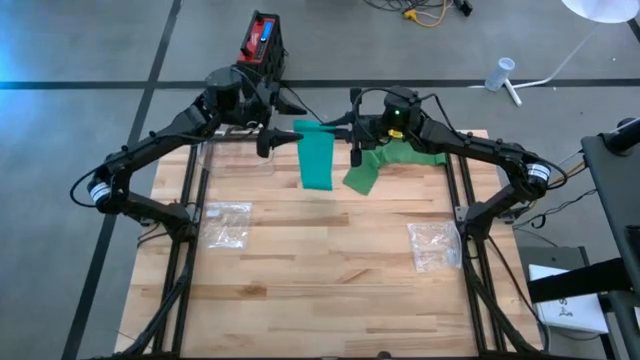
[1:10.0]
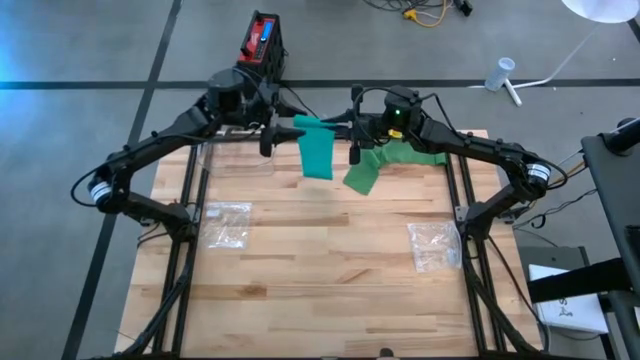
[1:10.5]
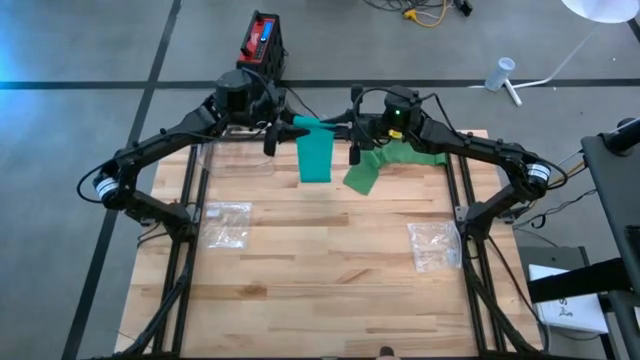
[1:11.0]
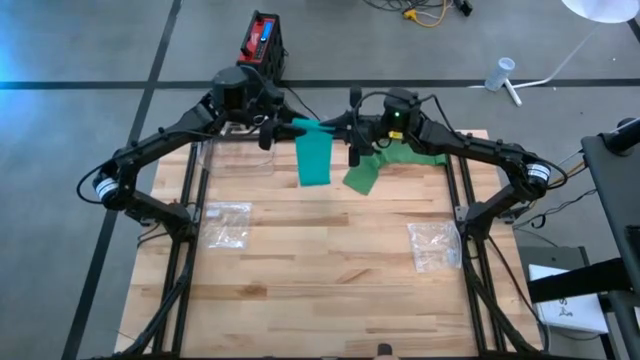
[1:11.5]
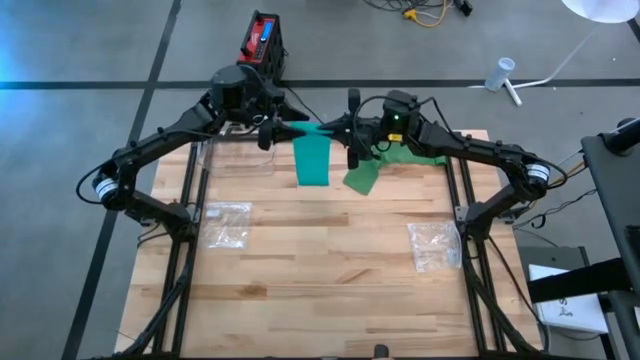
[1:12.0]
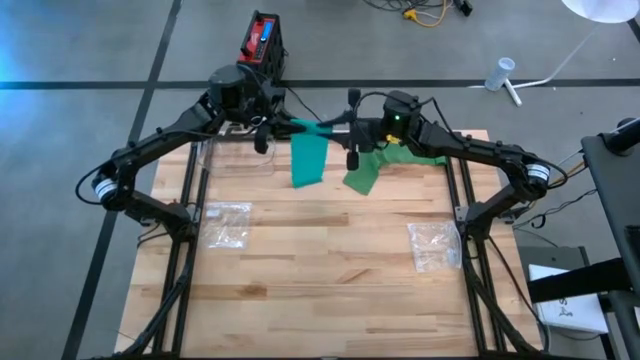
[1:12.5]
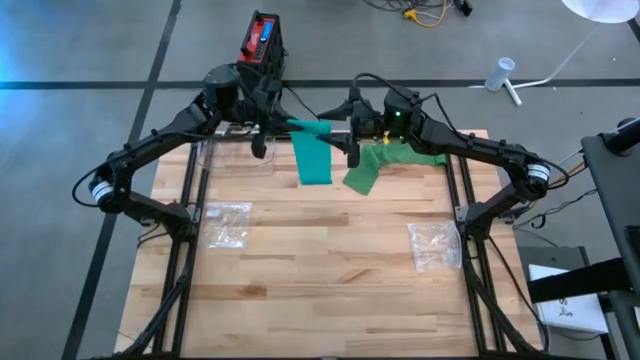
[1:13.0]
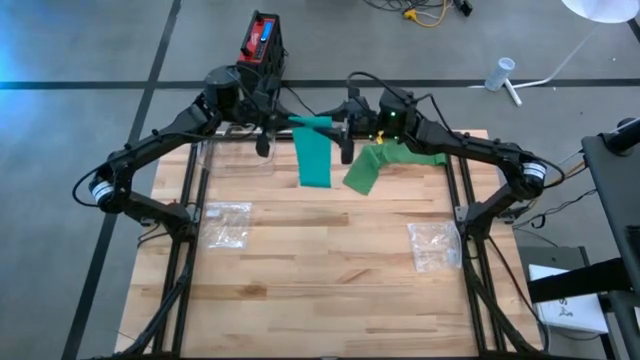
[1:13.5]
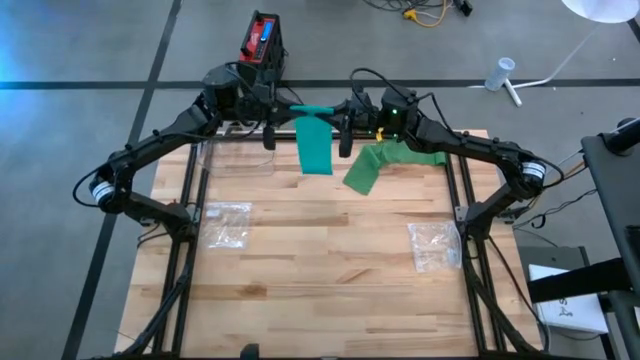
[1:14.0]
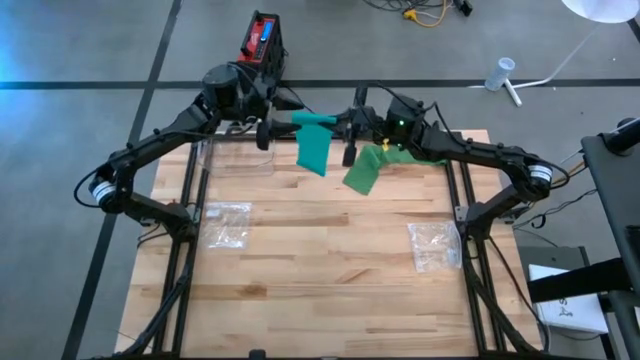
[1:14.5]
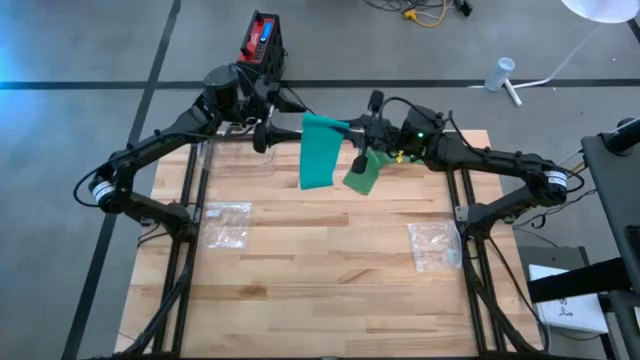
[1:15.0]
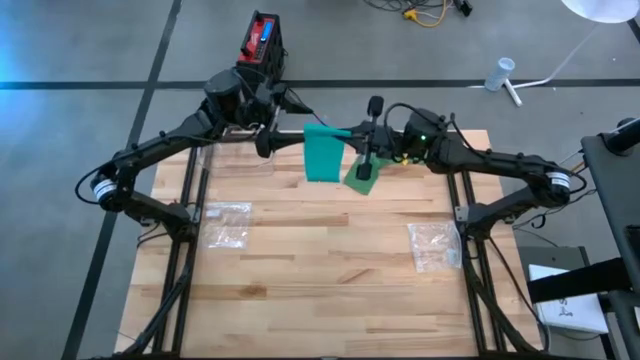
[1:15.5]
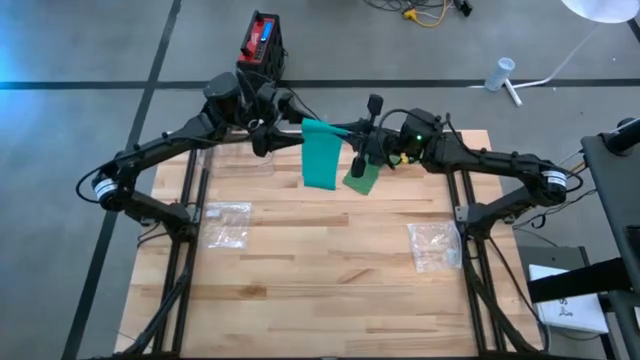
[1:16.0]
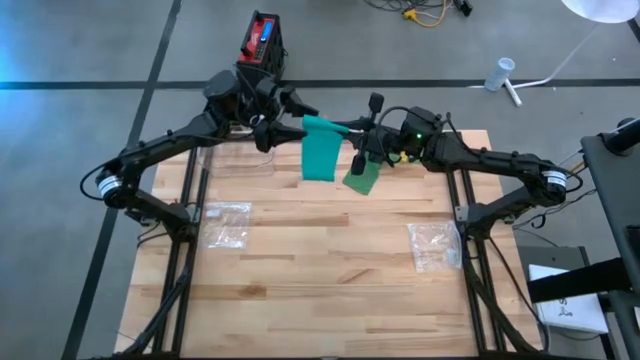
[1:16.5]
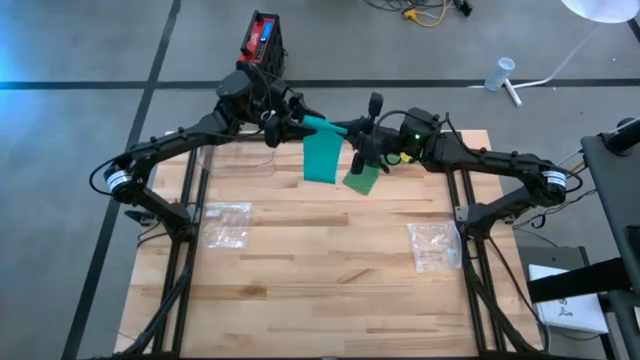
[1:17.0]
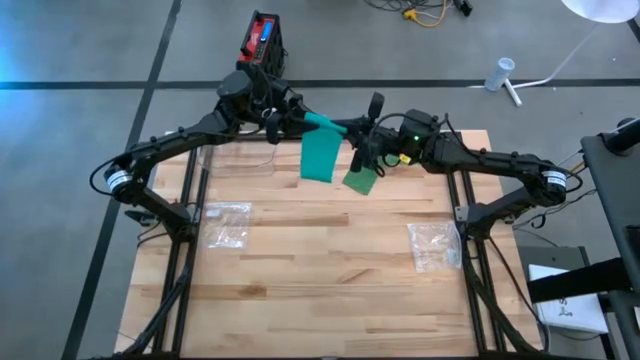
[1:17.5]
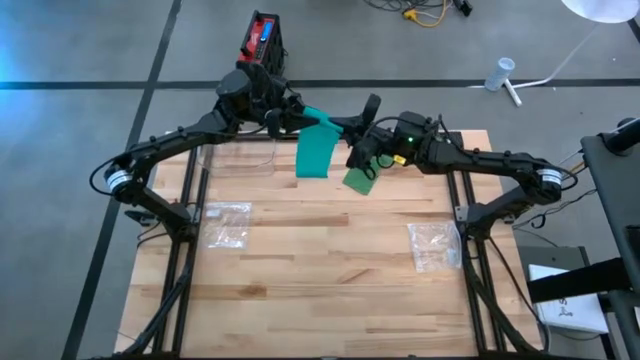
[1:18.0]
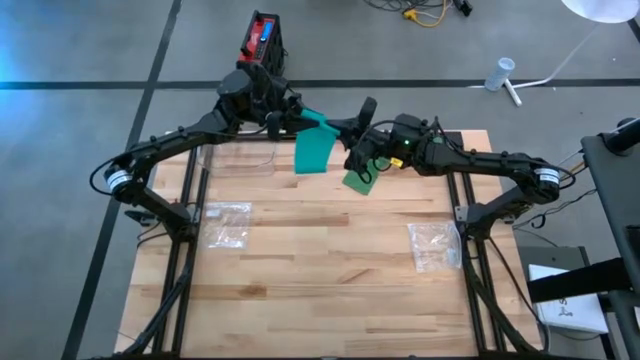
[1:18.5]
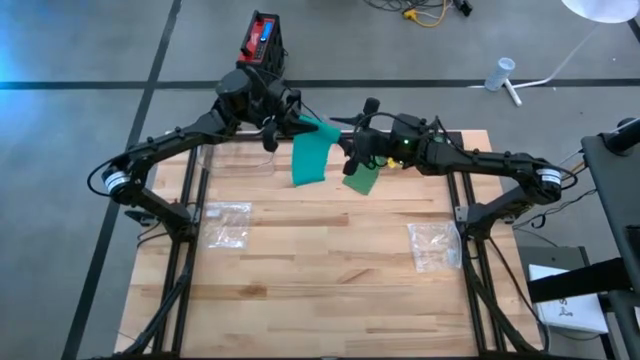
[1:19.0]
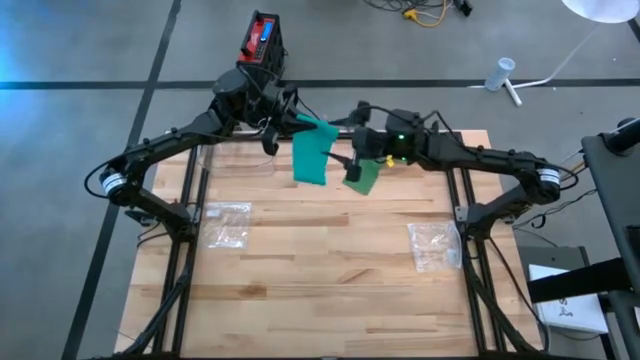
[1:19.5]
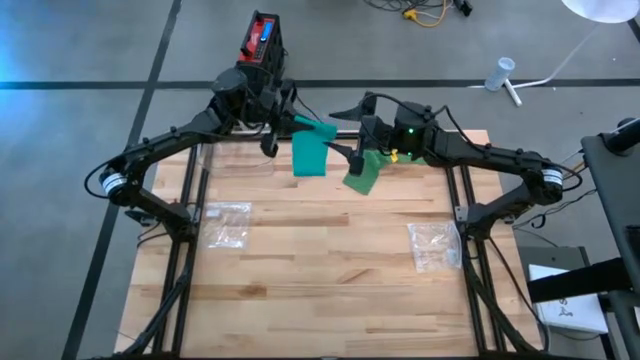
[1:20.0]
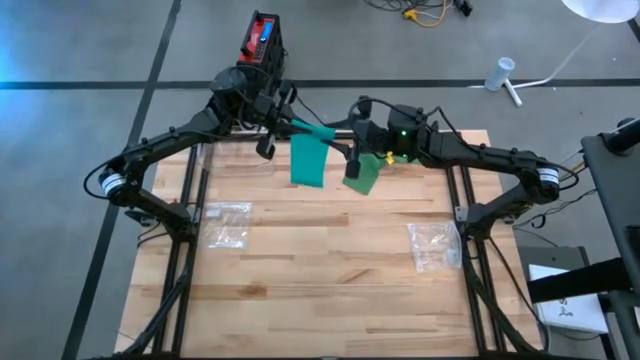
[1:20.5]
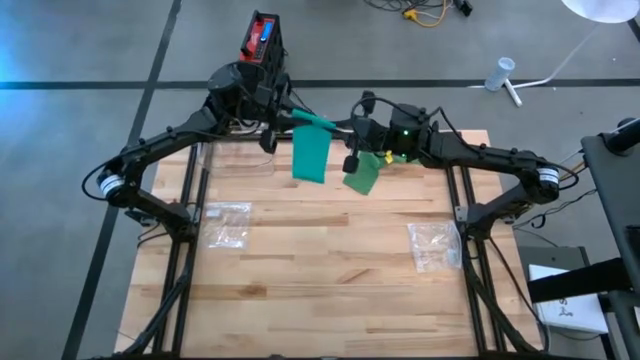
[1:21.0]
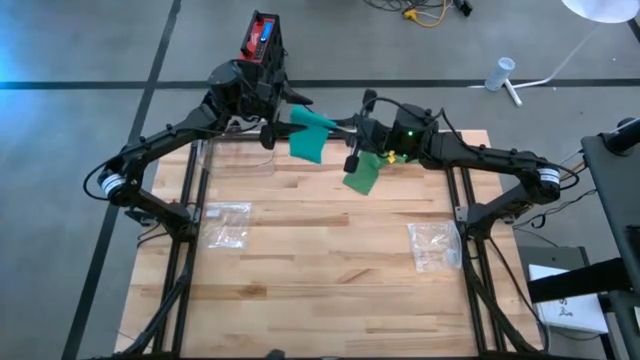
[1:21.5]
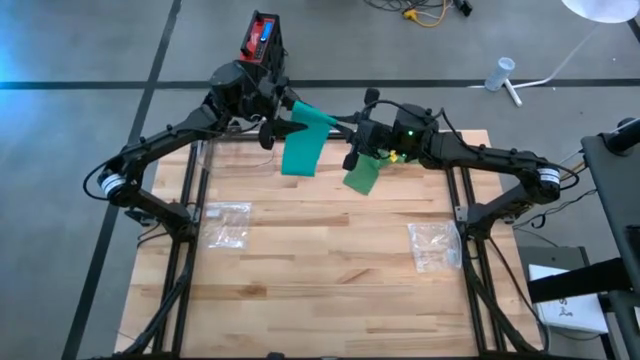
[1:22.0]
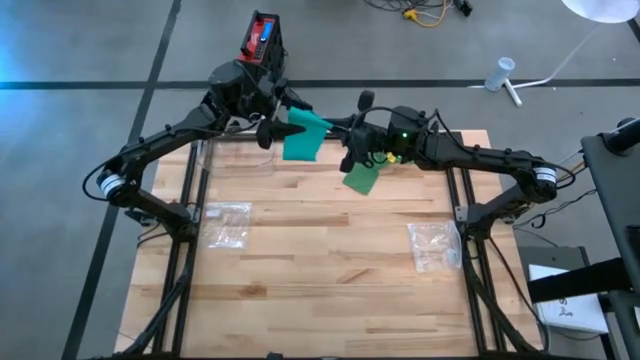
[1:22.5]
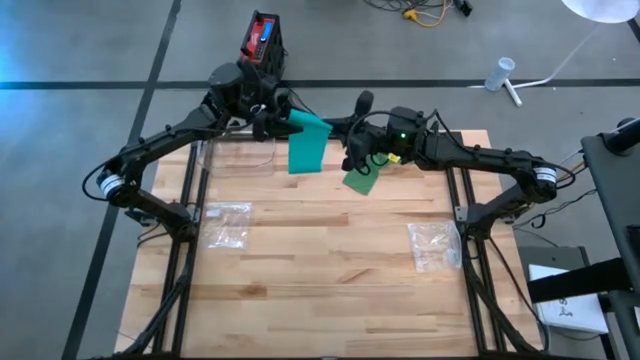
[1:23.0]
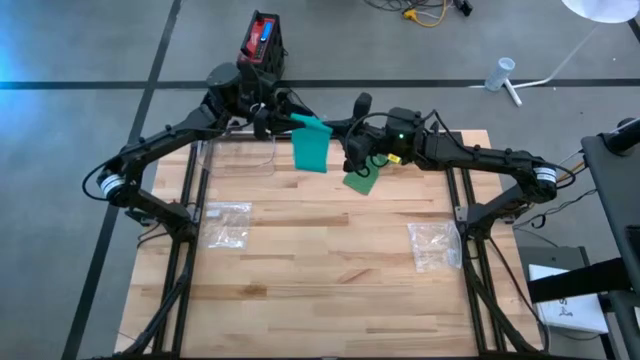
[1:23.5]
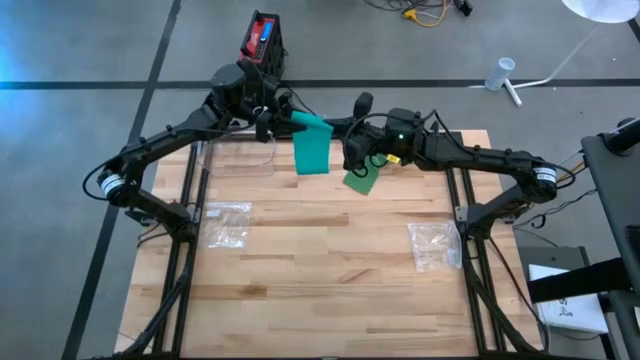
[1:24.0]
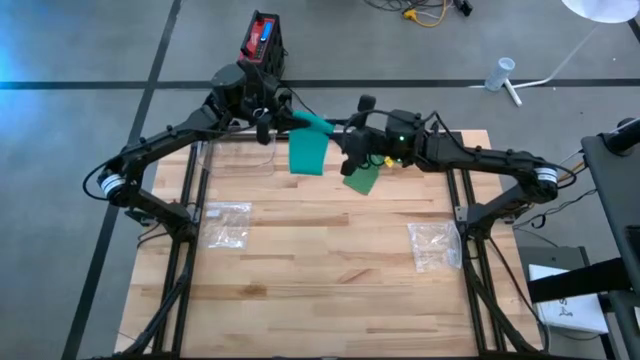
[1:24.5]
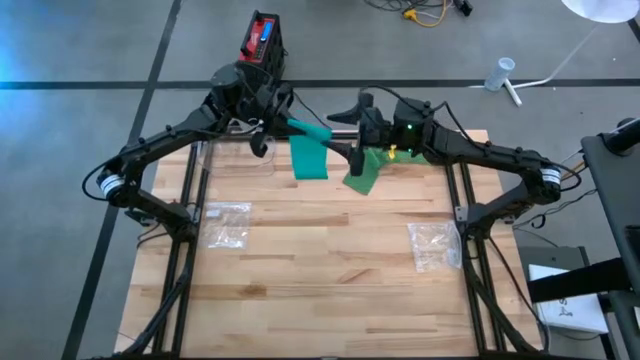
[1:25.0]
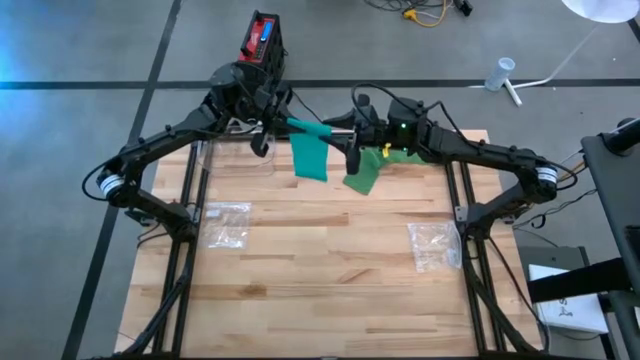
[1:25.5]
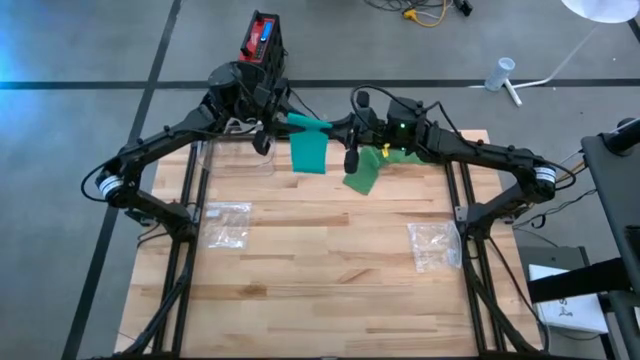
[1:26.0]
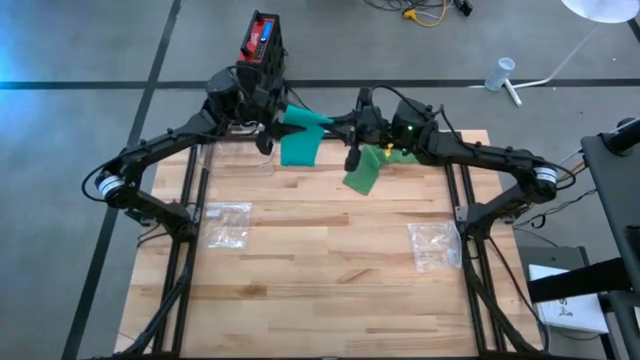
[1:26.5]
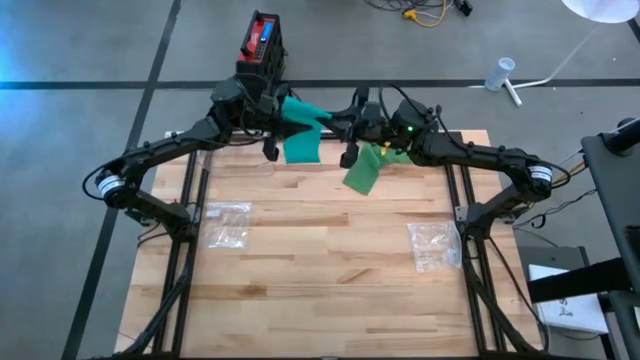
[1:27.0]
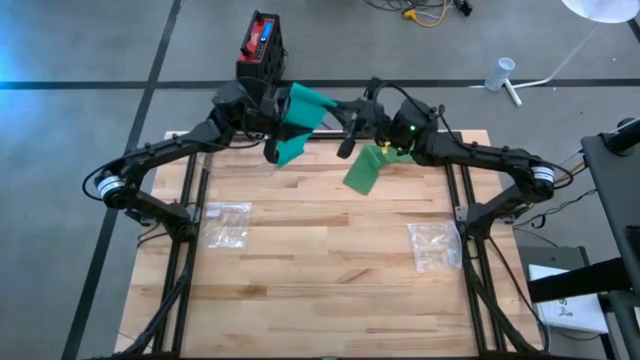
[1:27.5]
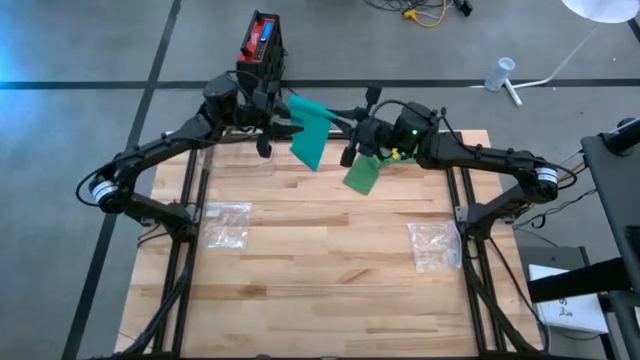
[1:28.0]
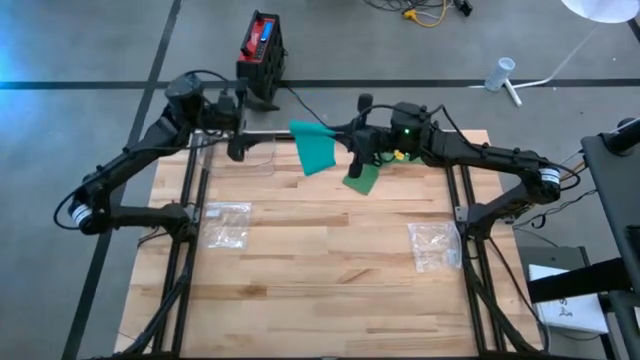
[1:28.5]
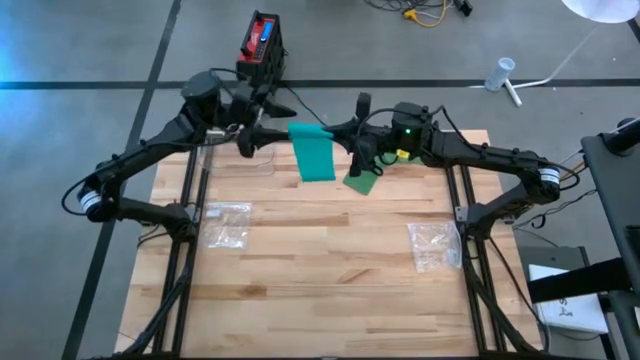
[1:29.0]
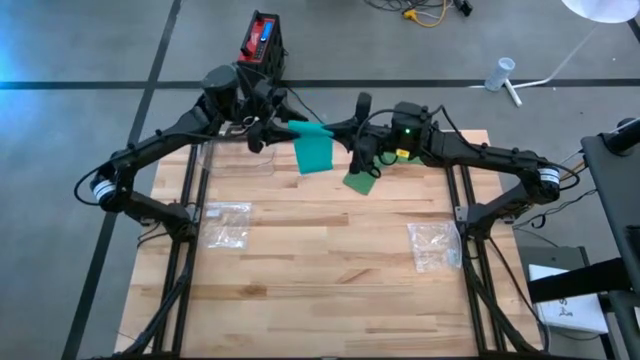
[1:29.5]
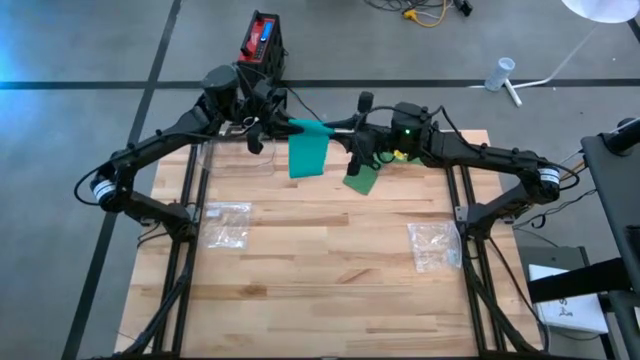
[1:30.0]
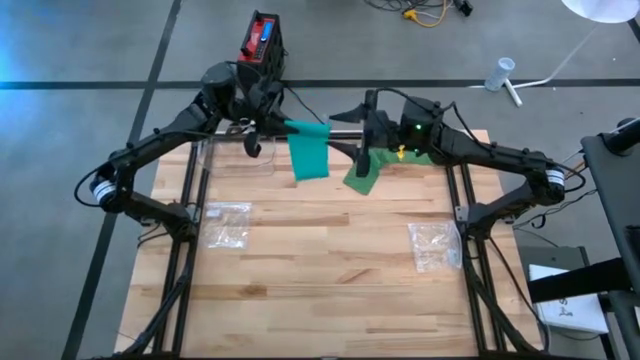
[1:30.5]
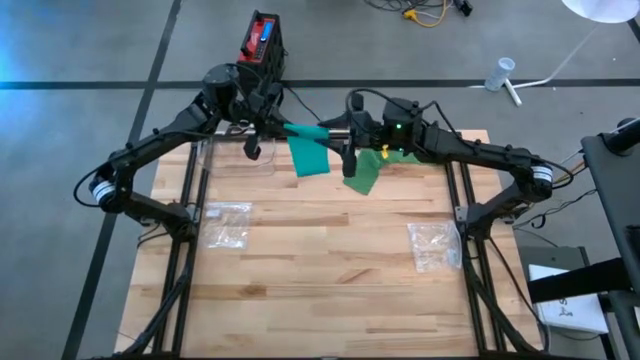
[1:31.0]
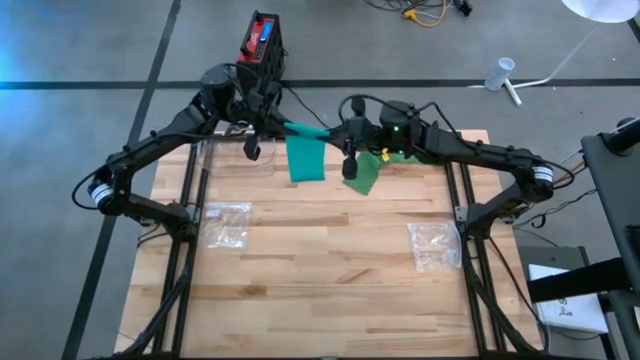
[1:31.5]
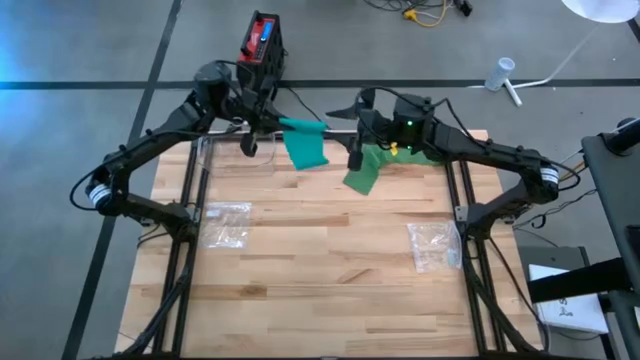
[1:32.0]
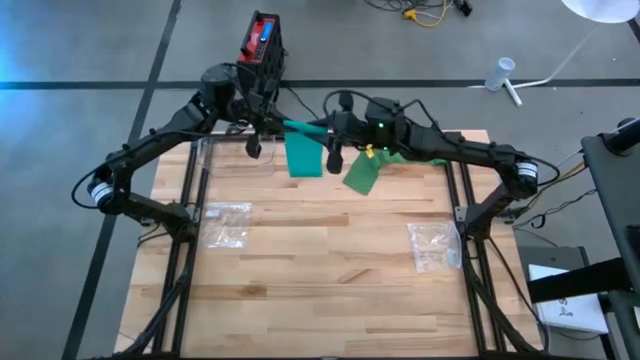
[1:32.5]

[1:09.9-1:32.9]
Task: Roll bandage
Roll the blue bandage
